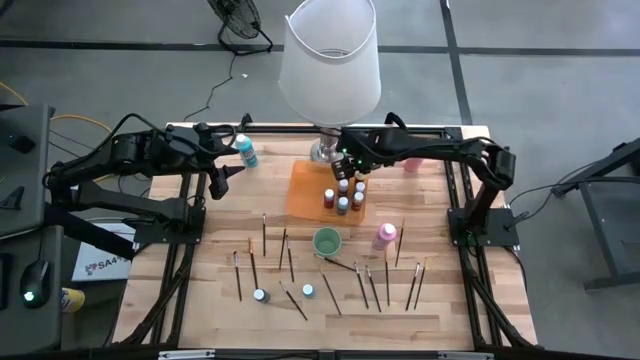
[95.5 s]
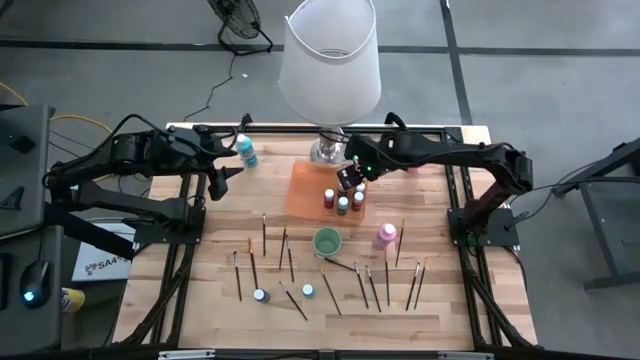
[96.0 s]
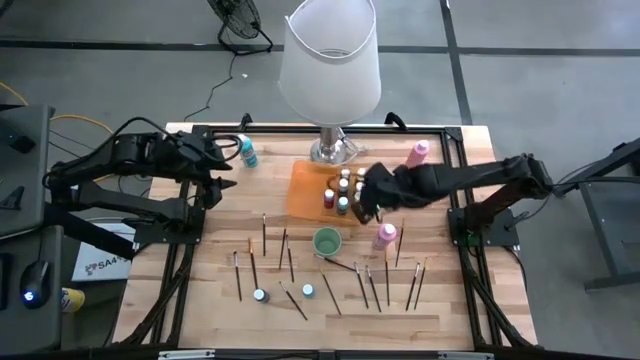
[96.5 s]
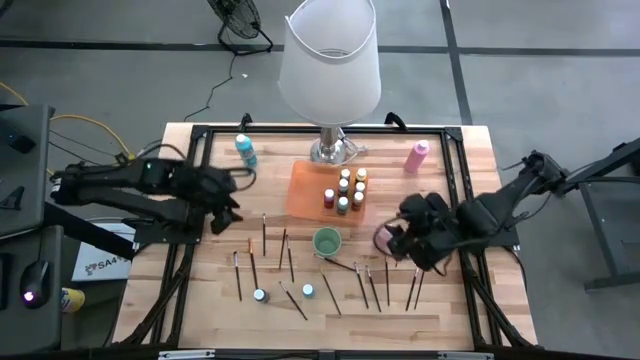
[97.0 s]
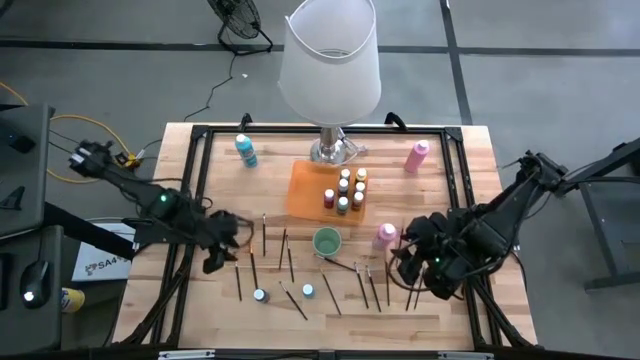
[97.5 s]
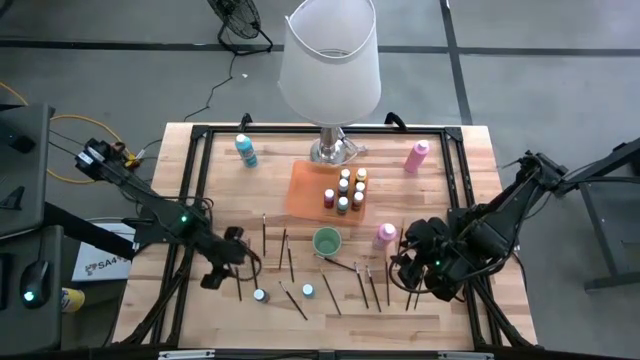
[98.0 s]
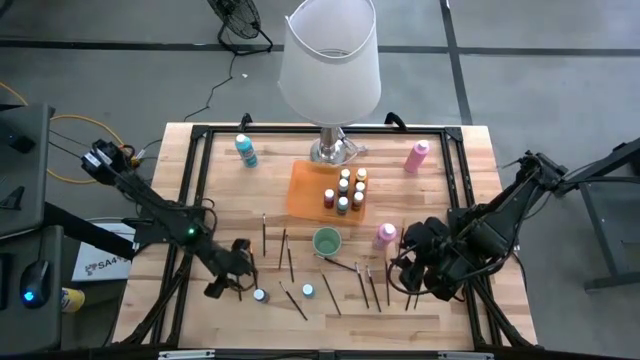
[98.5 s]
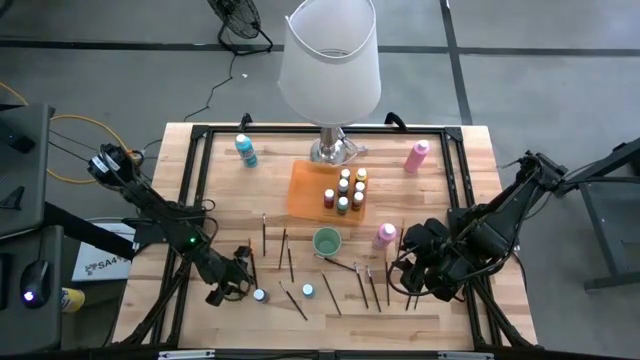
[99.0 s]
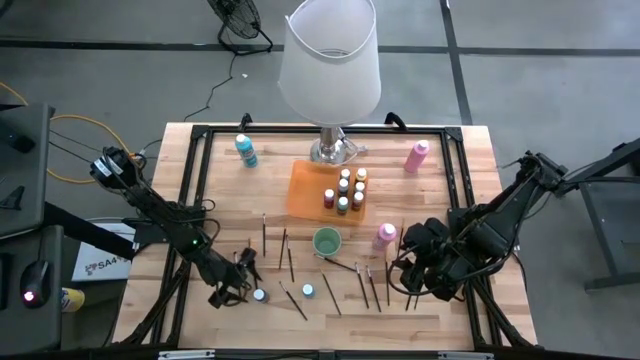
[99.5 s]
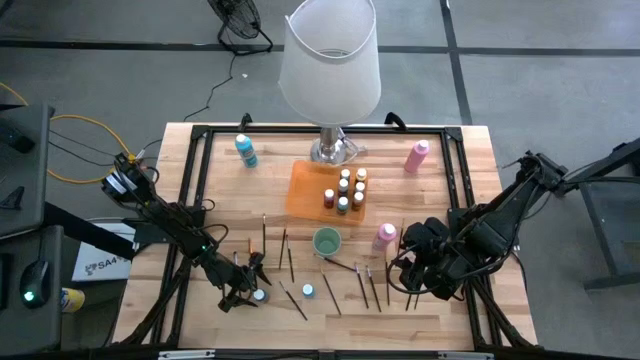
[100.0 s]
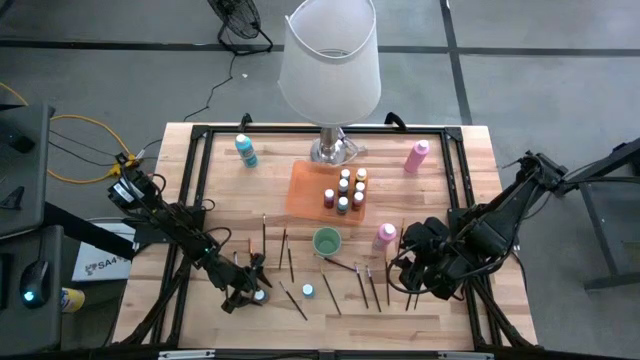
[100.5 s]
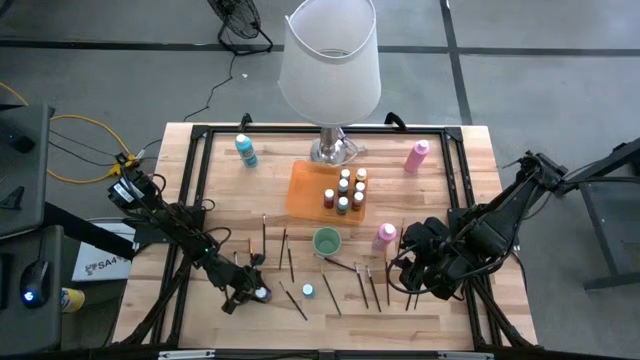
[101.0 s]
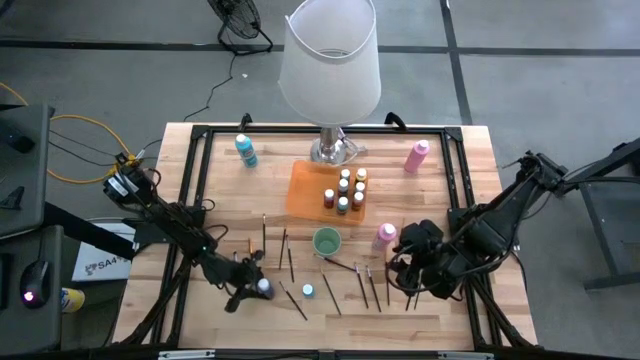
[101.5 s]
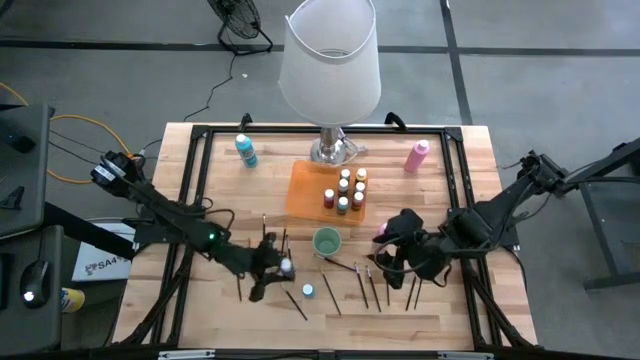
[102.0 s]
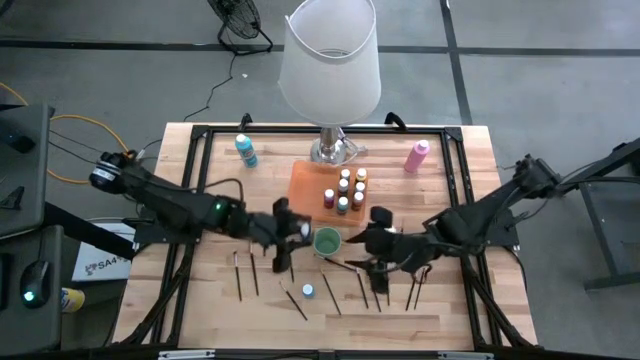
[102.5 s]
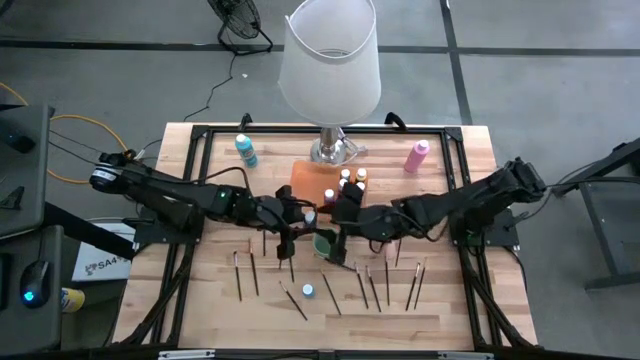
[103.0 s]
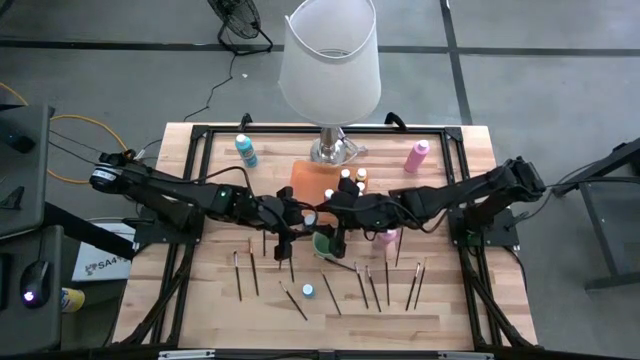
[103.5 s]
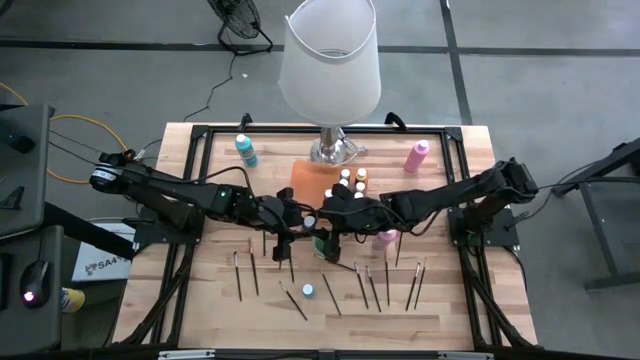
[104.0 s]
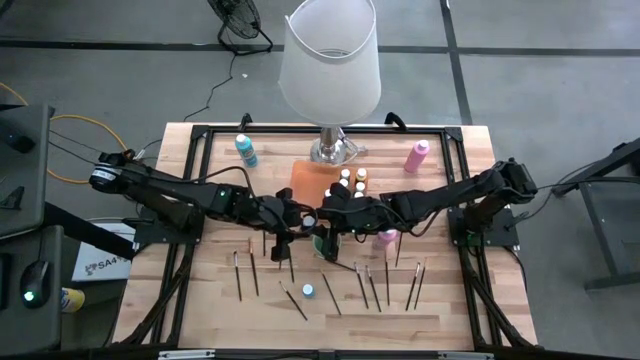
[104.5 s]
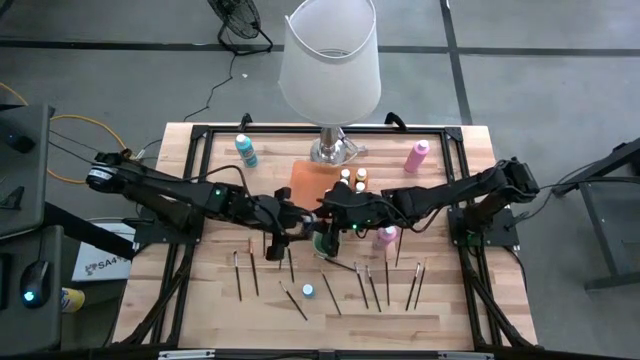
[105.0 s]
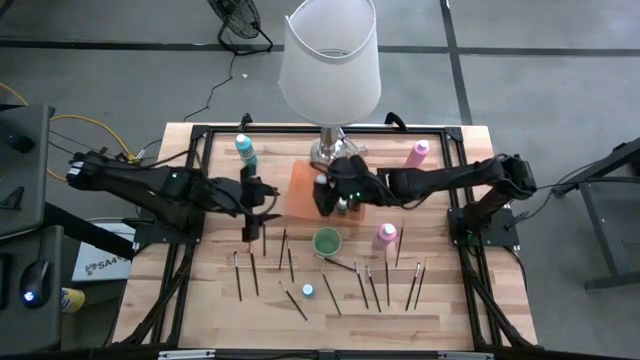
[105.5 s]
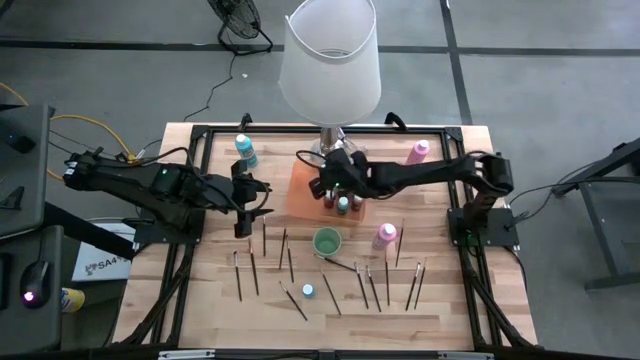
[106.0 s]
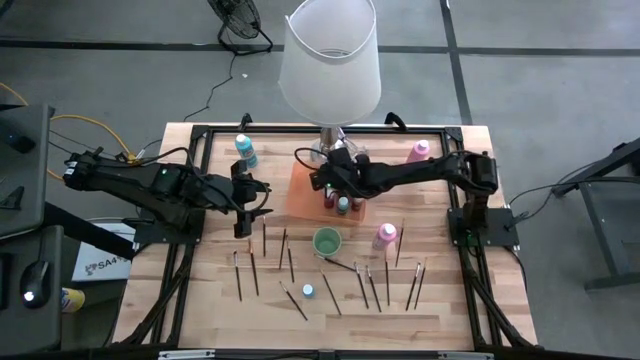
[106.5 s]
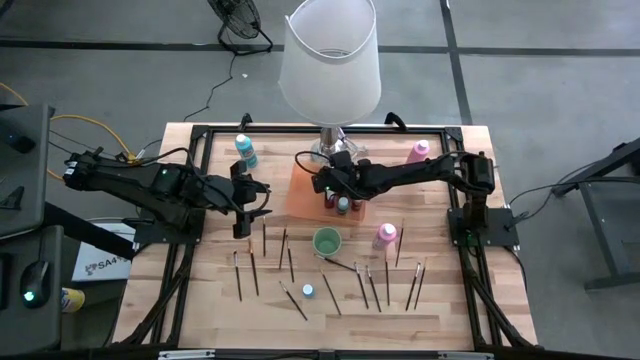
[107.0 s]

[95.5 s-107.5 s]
Task: Pick & Place Paint Supplies
Put the small dark blue paint bottle into the orange bin

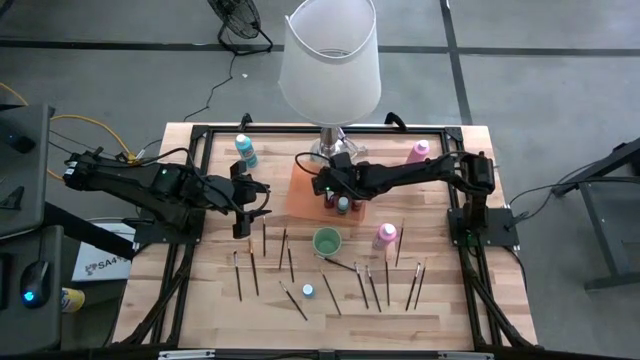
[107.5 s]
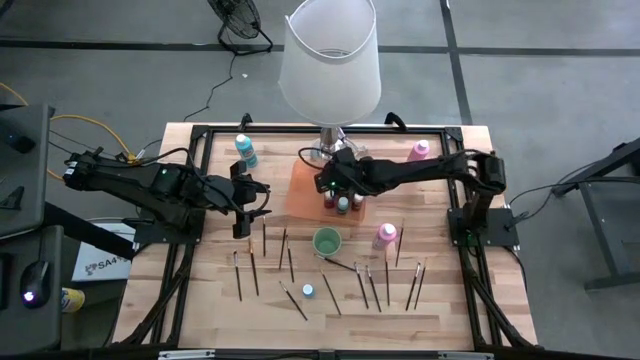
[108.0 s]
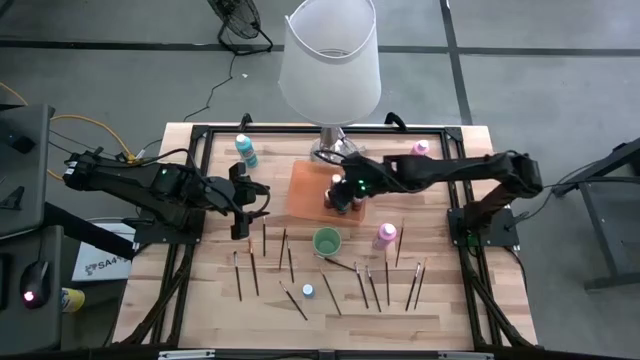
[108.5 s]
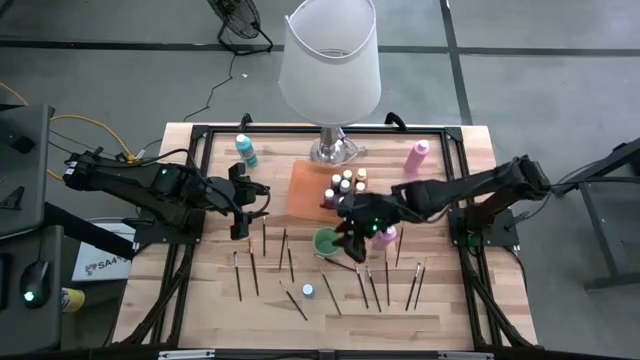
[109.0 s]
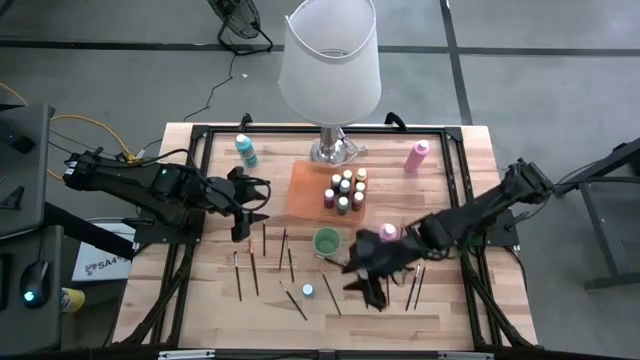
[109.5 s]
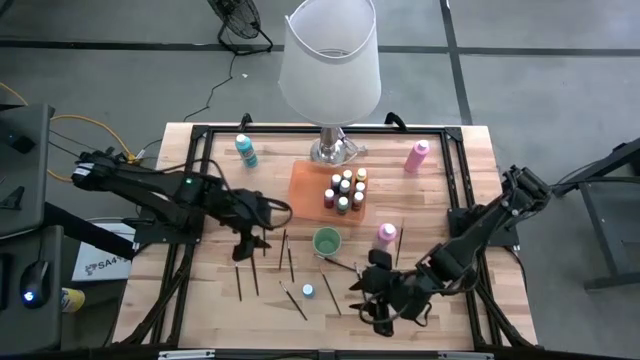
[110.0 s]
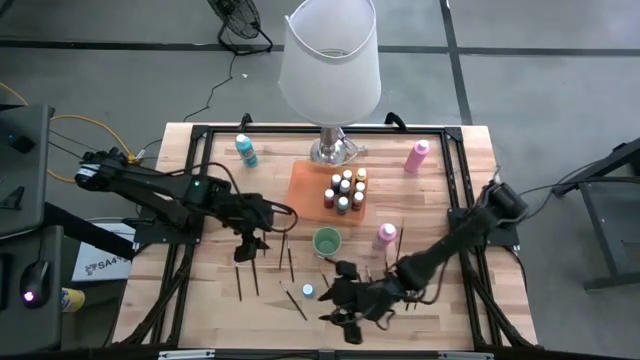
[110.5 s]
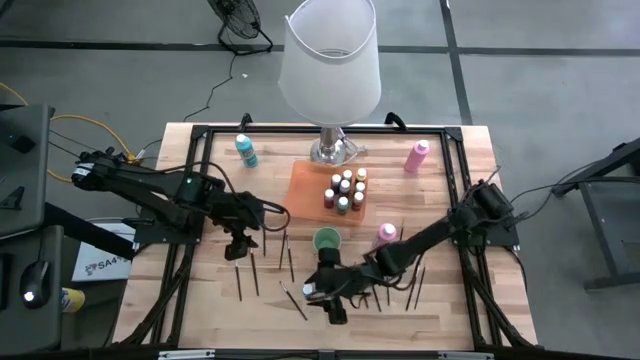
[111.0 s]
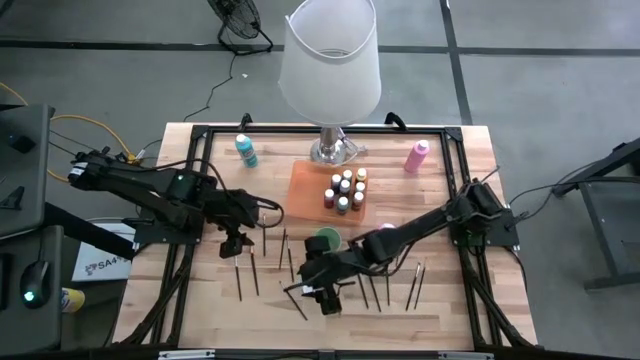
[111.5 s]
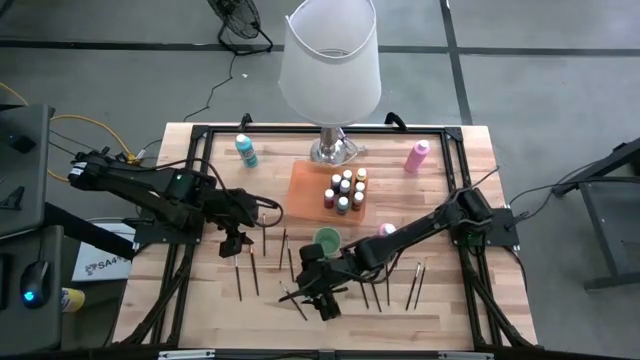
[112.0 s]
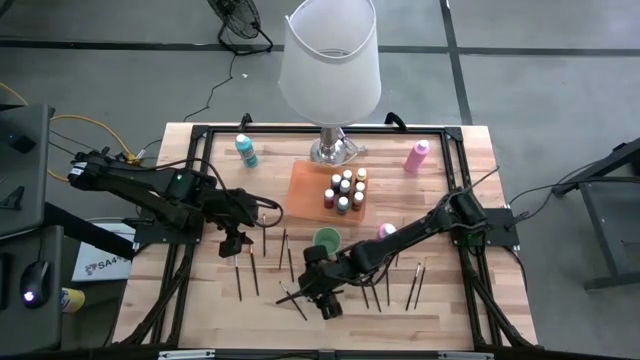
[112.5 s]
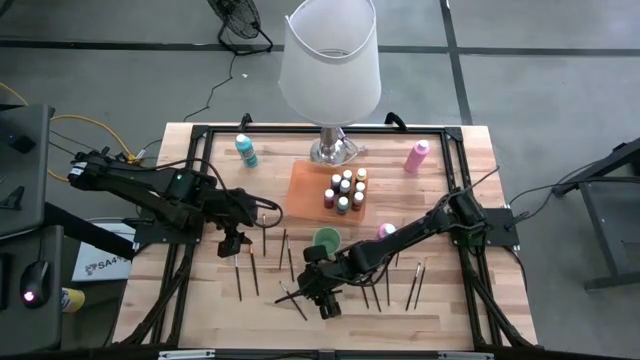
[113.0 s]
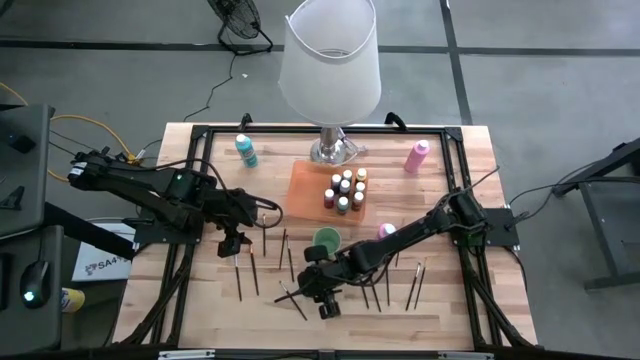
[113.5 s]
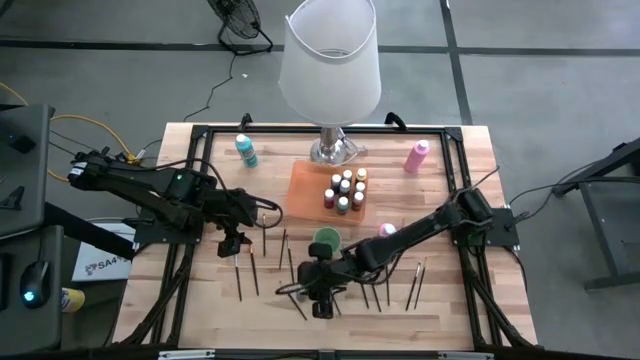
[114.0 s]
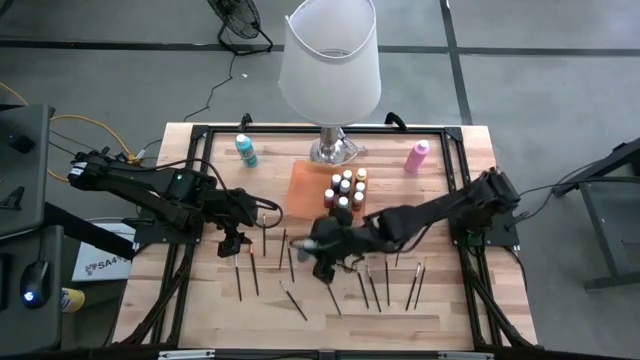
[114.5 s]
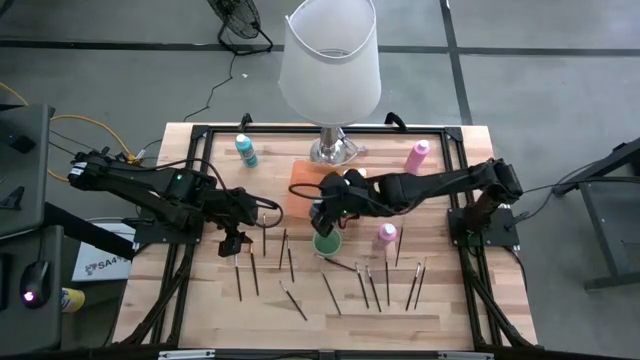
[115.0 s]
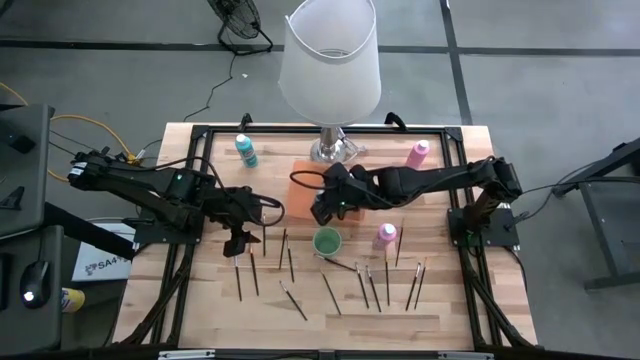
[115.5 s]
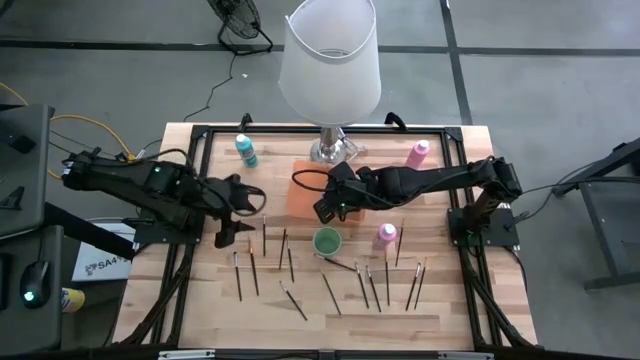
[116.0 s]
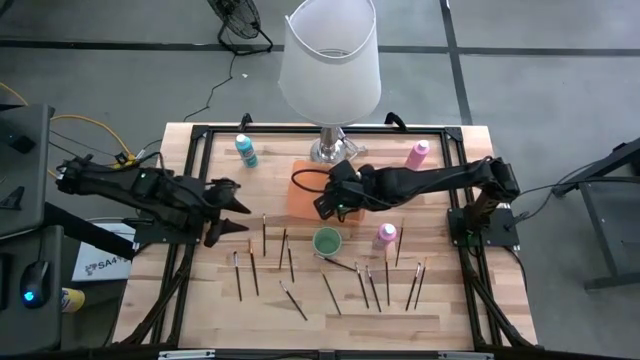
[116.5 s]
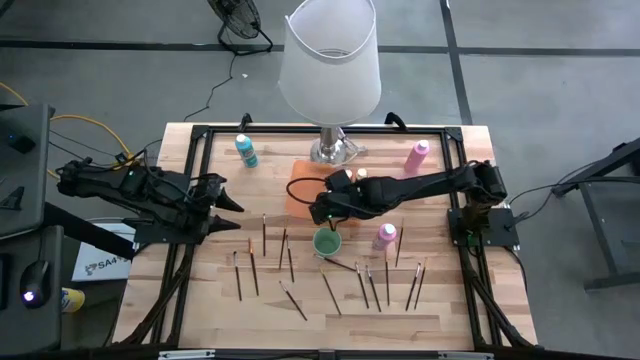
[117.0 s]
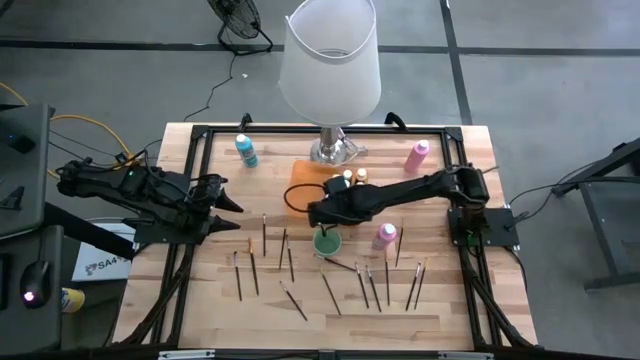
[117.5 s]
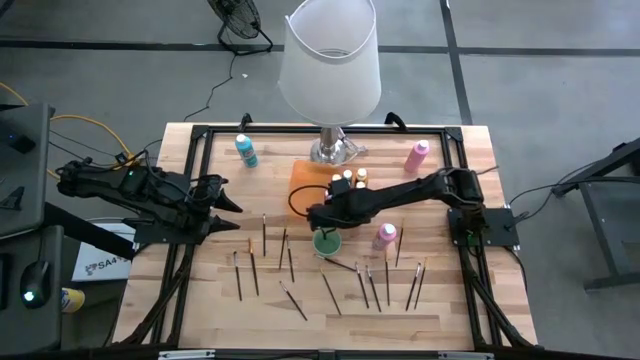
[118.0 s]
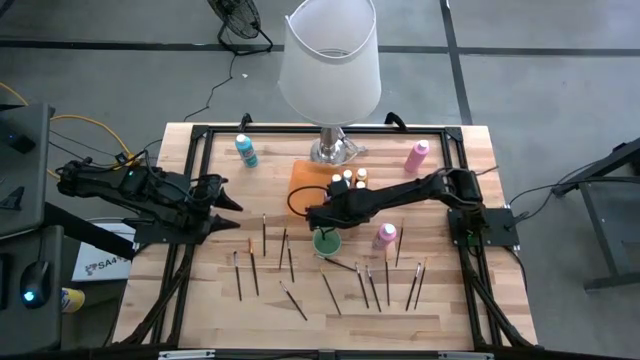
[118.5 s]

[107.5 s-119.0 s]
Put the small light blue paint bottle into the orange bin
